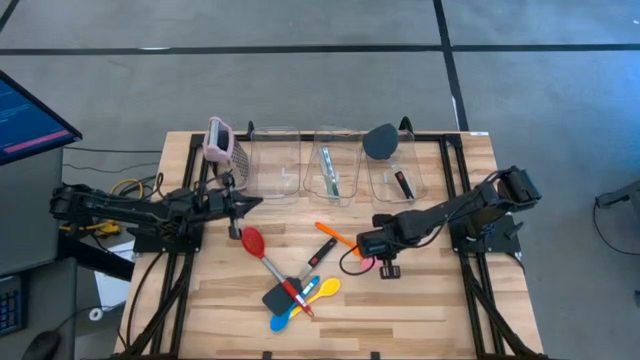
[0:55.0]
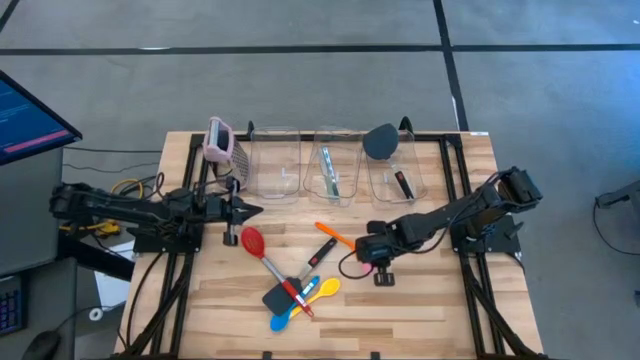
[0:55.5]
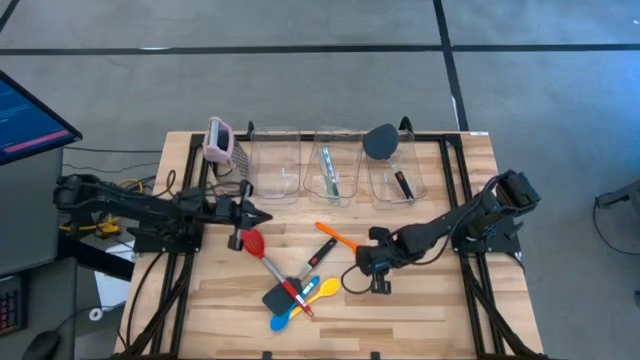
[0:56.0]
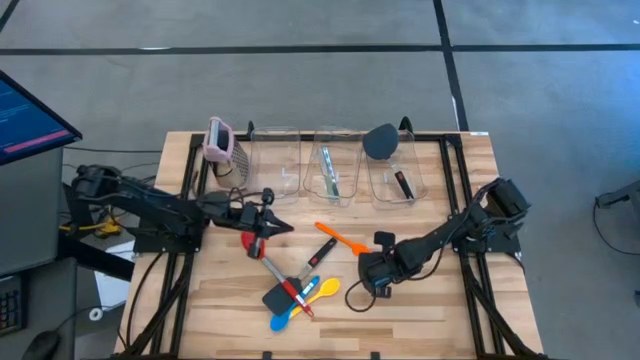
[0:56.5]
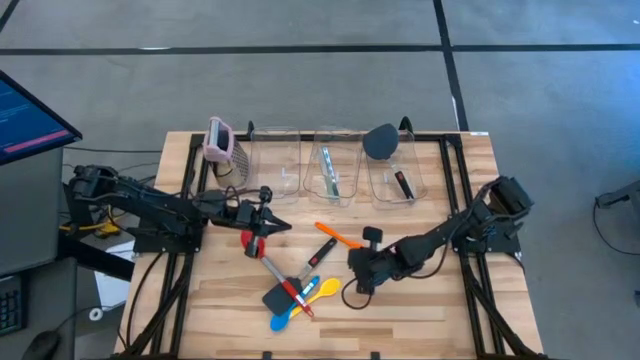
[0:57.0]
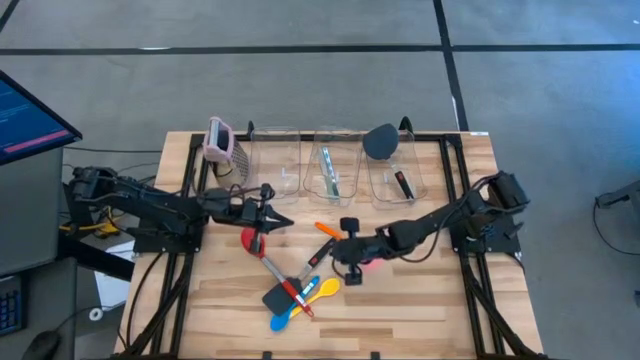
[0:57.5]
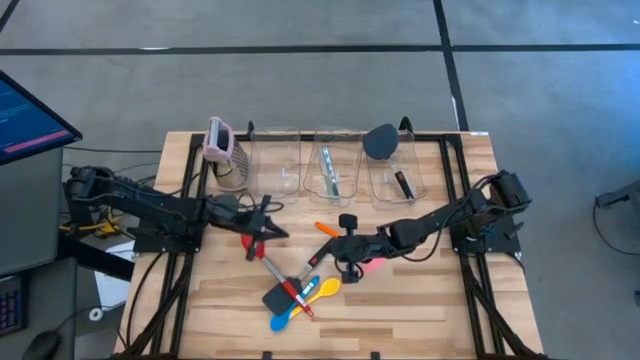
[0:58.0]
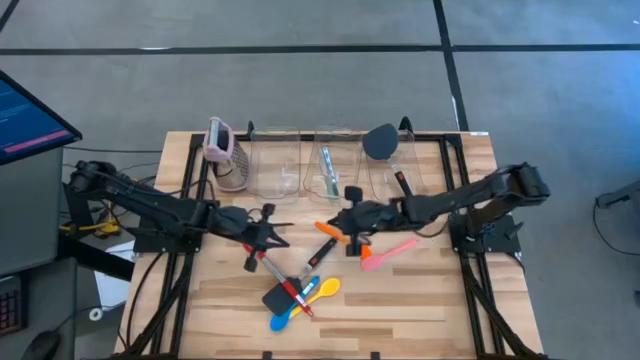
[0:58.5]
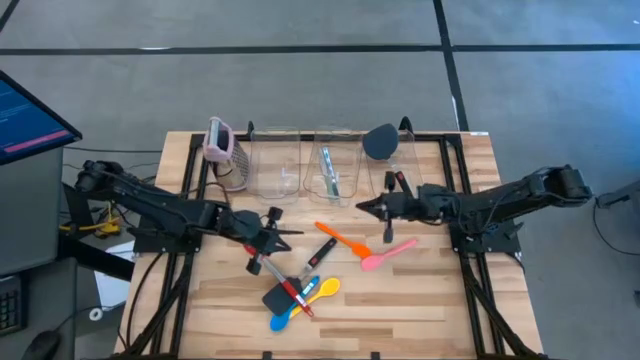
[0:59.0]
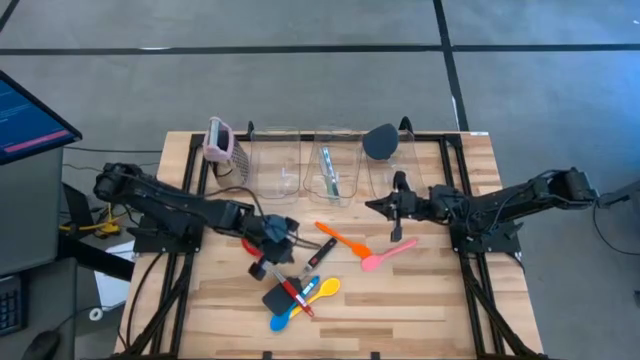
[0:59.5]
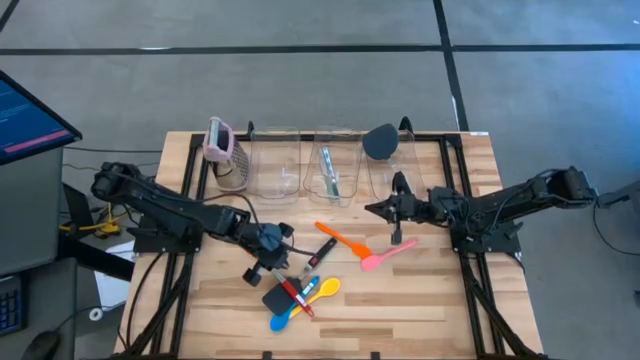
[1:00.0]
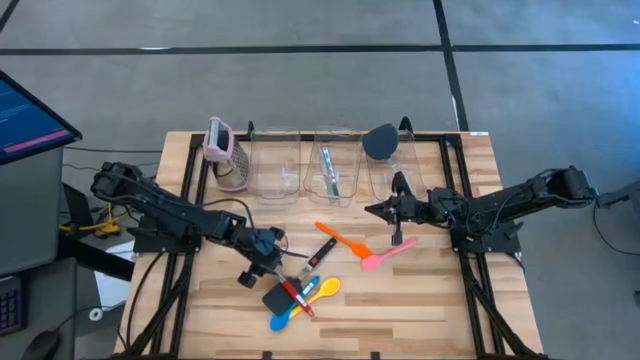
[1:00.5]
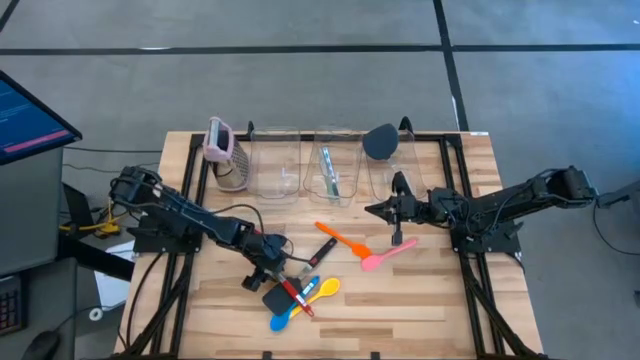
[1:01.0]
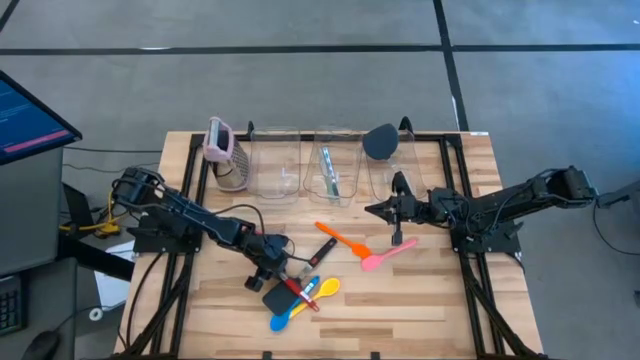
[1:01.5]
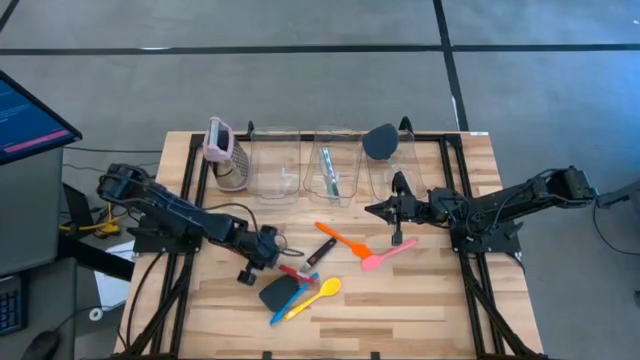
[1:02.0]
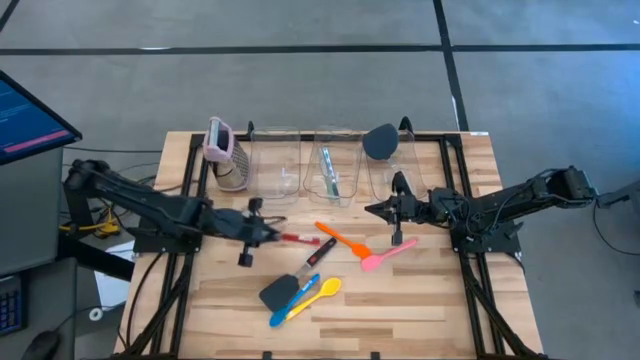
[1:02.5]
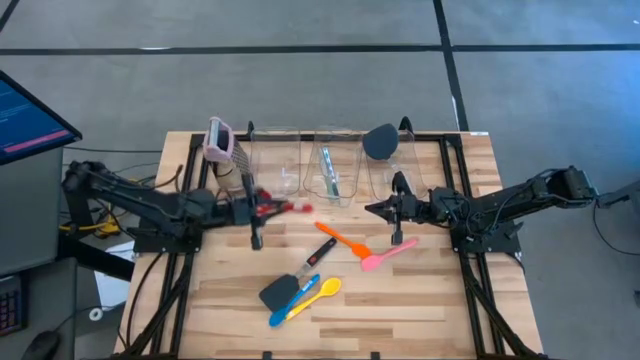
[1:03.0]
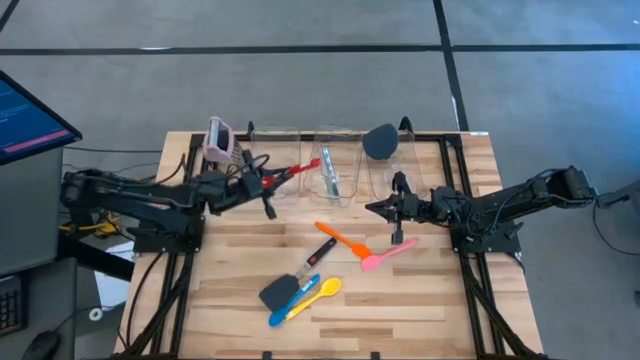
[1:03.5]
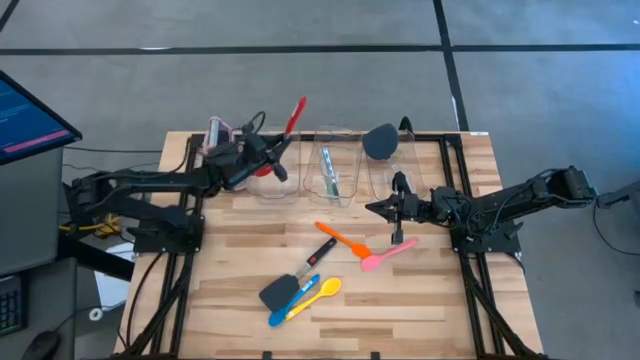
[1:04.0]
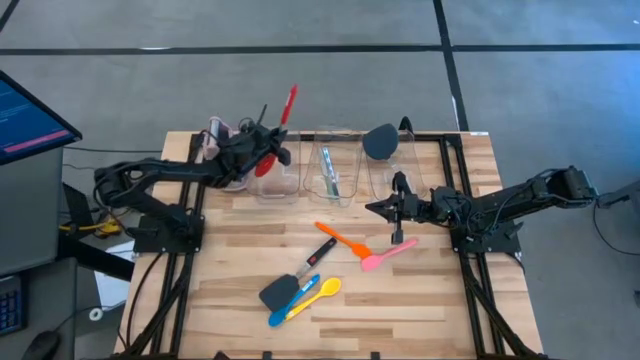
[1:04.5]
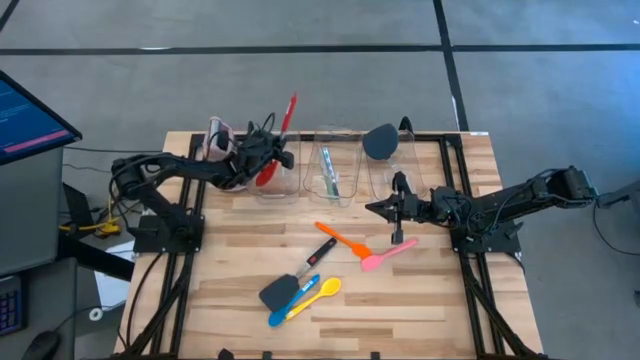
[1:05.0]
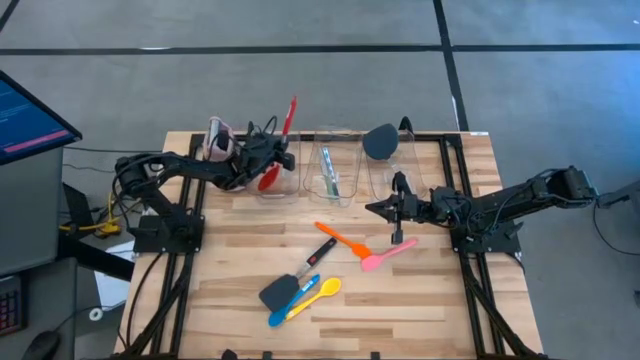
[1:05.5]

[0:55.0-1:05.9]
Task: Pick & Place Kitchen Items
Put the red serving spoon into the left transparent bin

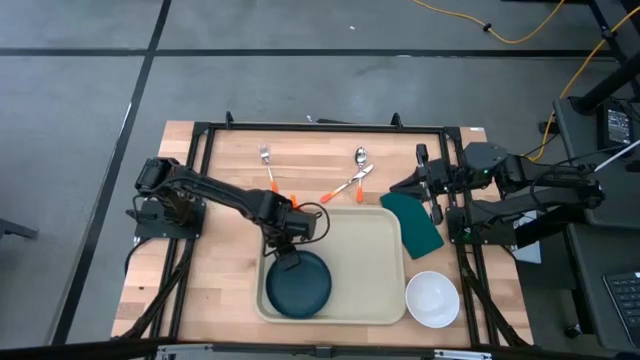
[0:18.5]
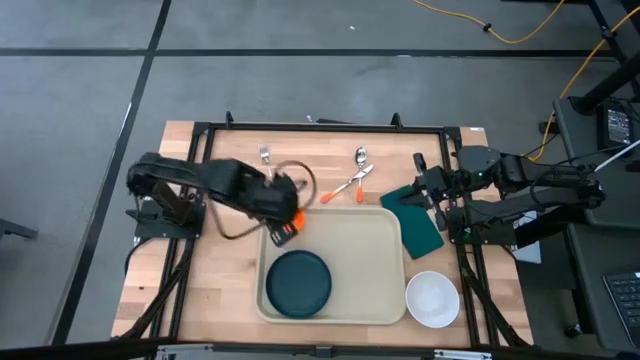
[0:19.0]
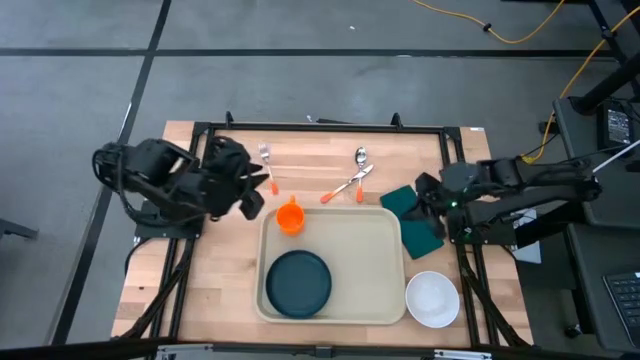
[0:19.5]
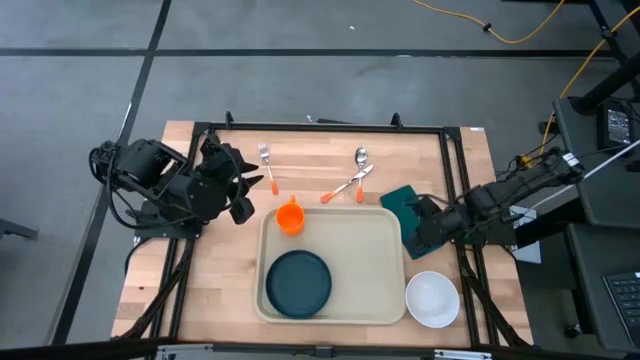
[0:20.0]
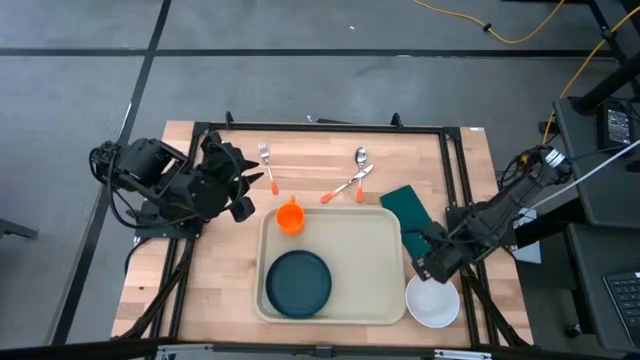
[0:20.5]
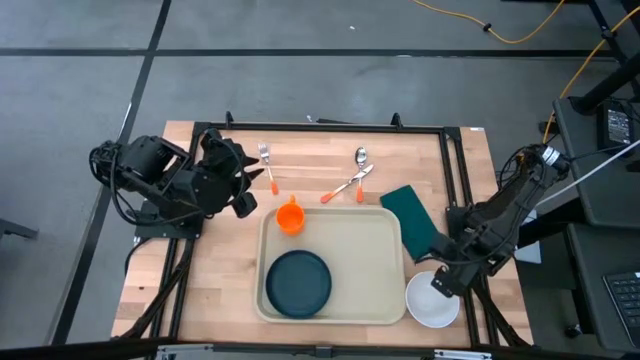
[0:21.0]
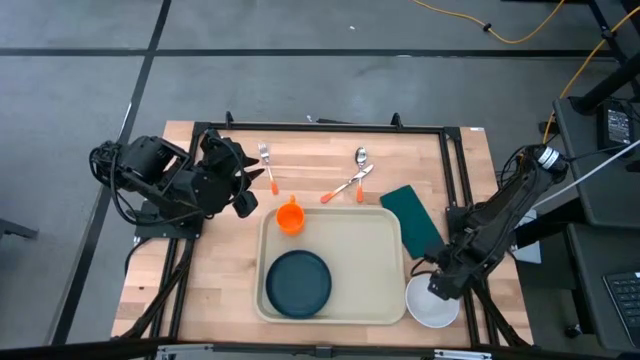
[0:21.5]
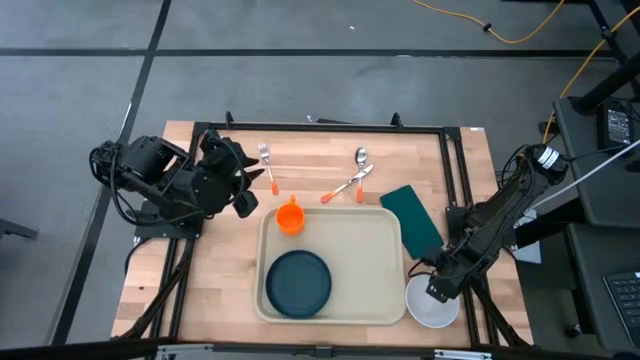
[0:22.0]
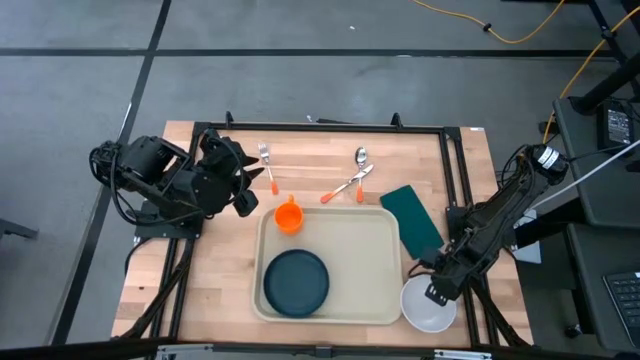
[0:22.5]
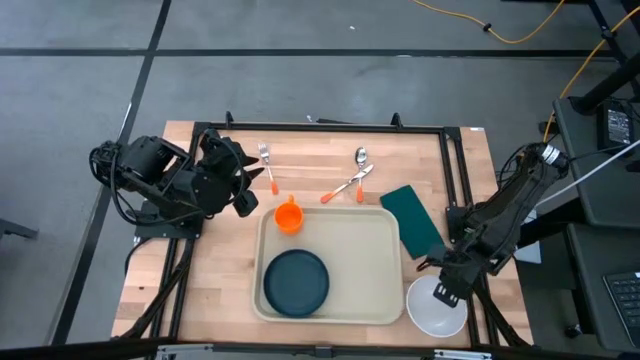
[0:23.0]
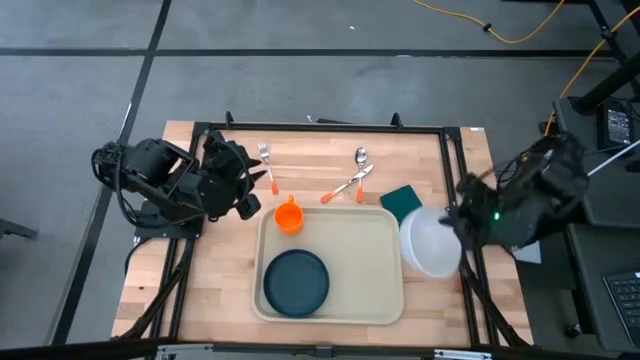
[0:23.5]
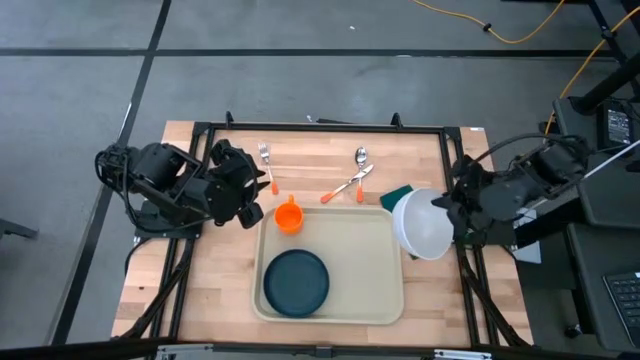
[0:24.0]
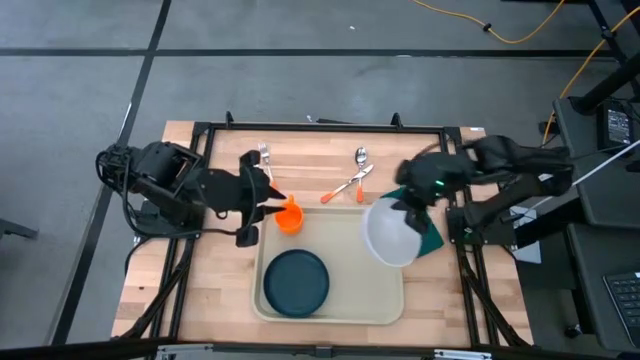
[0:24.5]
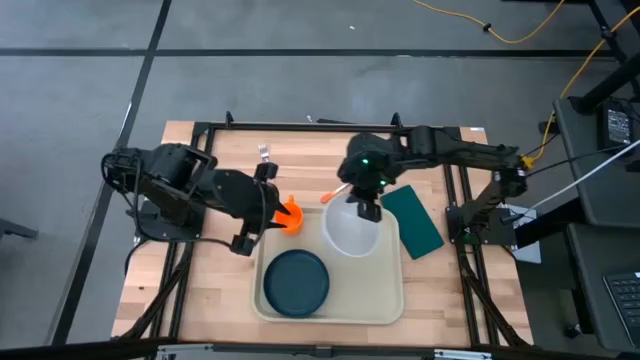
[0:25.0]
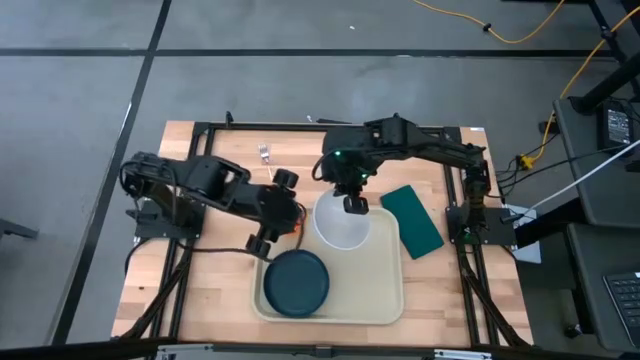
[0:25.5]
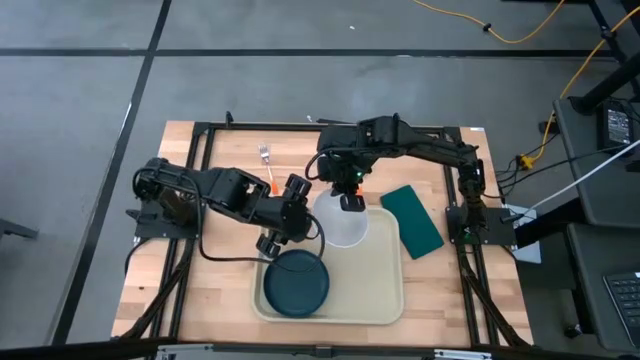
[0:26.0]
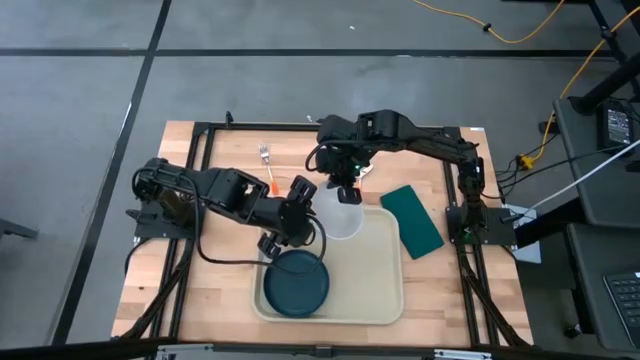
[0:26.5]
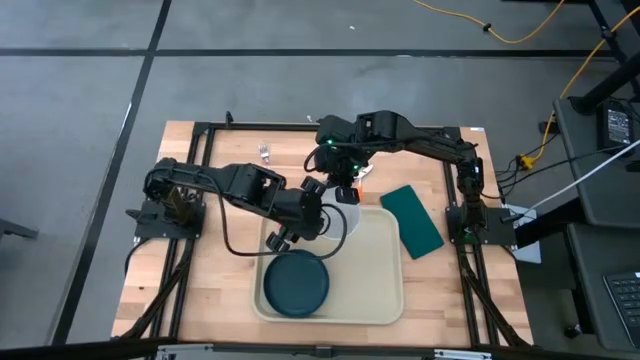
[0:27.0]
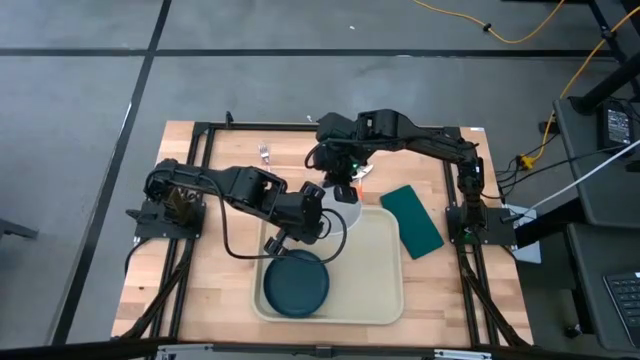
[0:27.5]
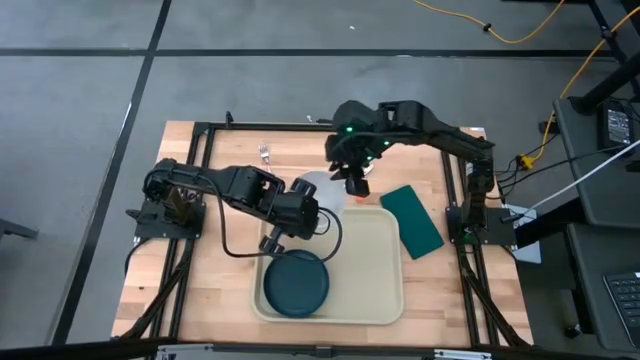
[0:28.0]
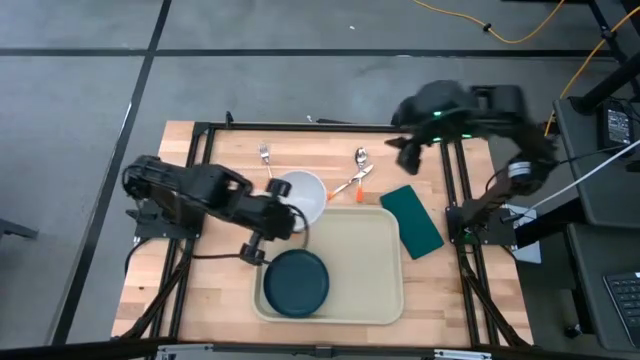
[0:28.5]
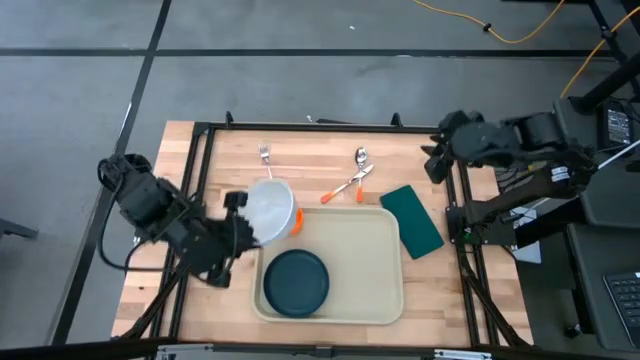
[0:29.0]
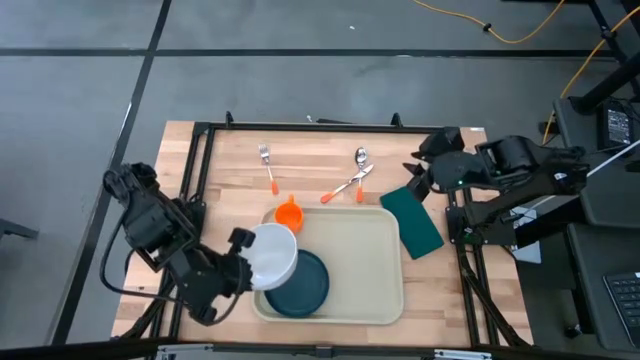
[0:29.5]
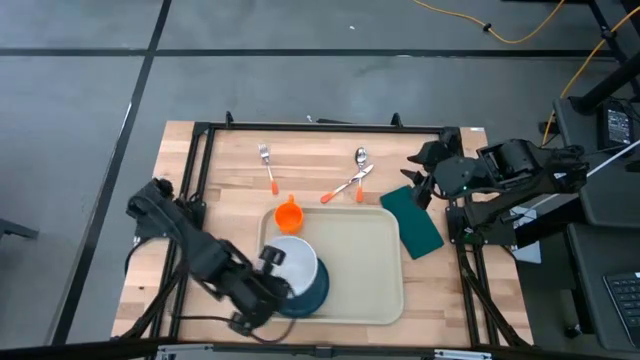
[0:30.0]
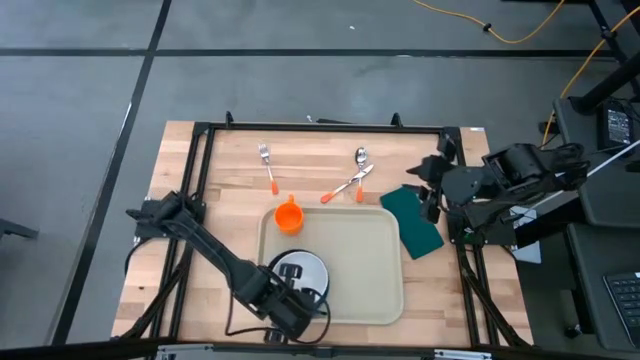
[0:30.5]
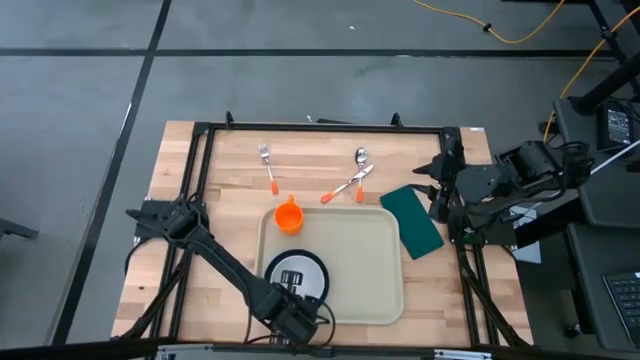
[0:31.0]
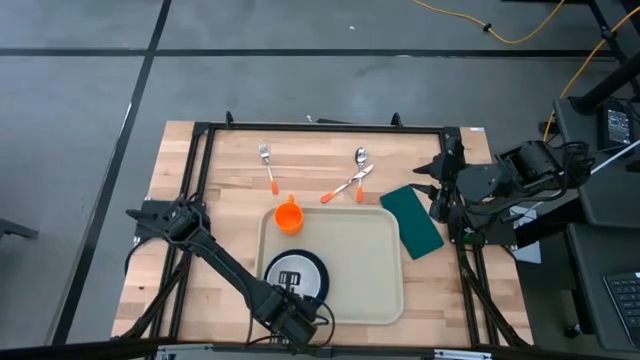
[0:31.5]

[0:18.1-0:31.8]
Task: Set up tray
Put the white bowl on top of the blue plate on the light brown serving tray
